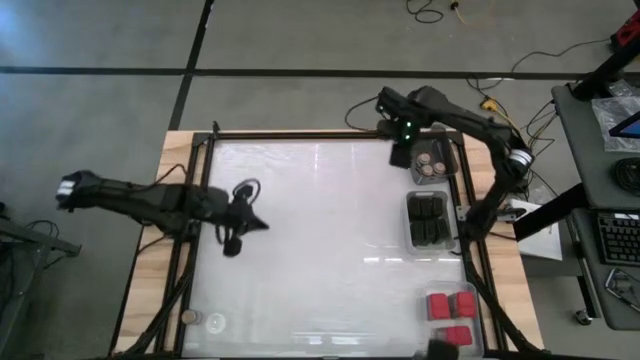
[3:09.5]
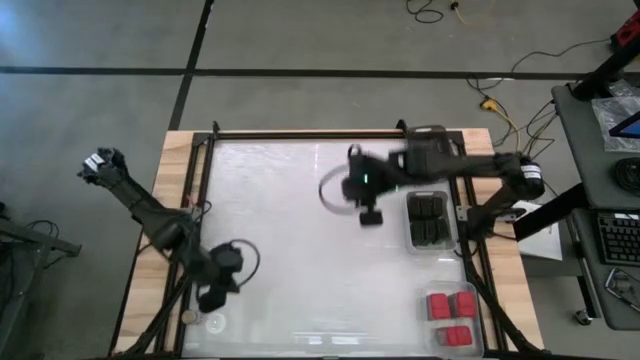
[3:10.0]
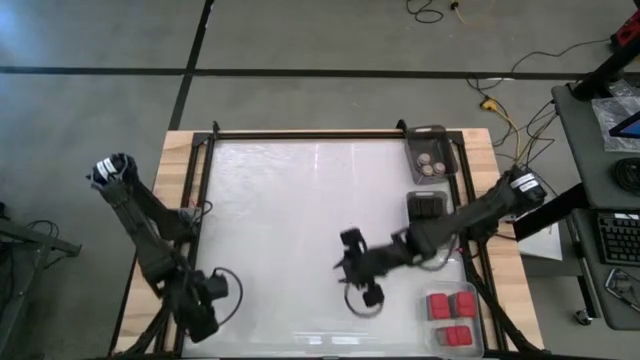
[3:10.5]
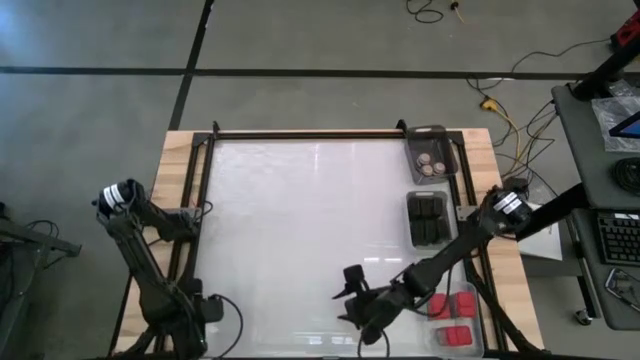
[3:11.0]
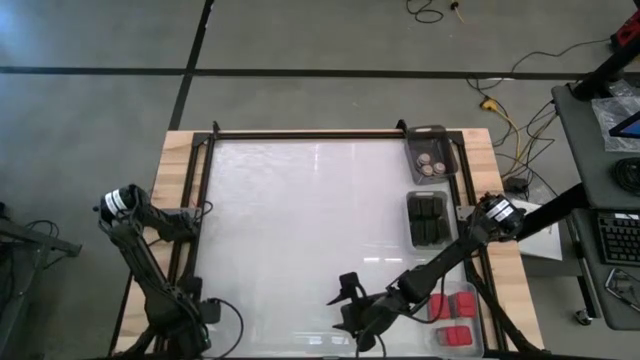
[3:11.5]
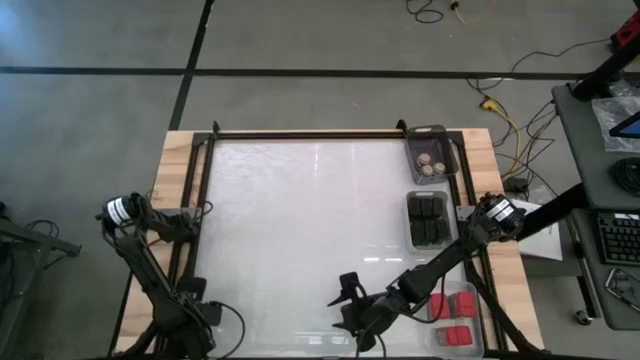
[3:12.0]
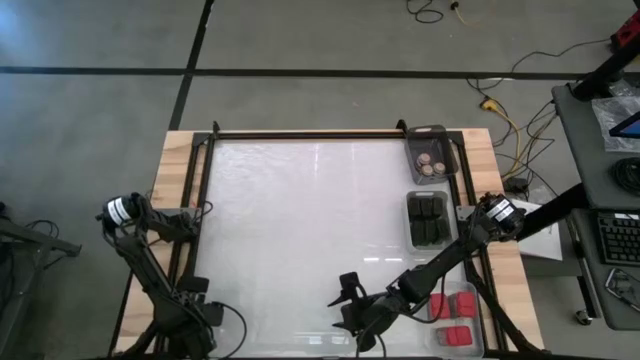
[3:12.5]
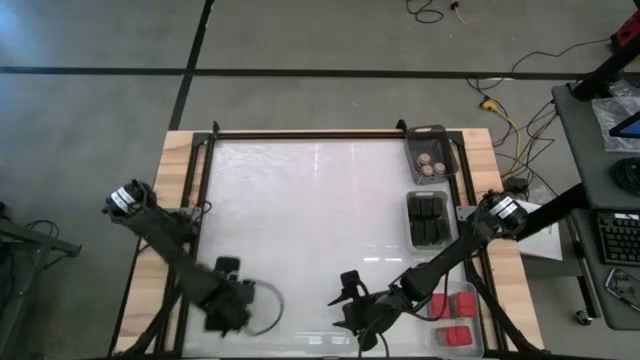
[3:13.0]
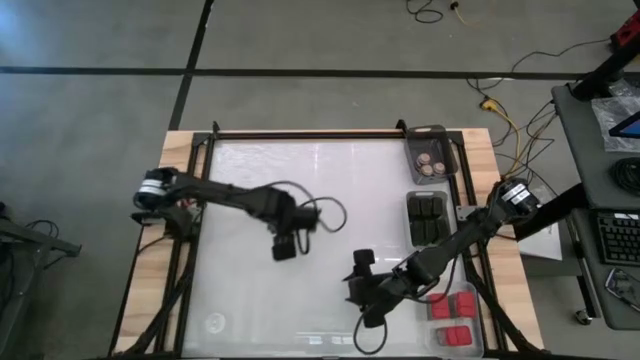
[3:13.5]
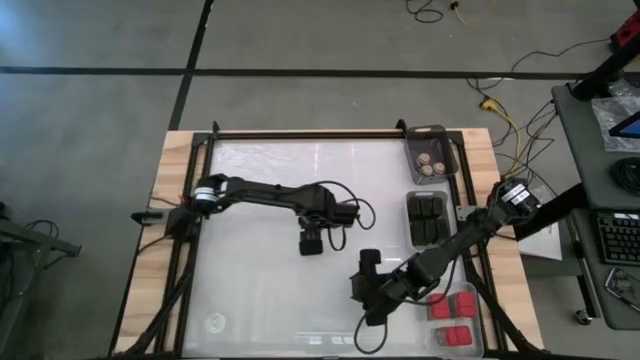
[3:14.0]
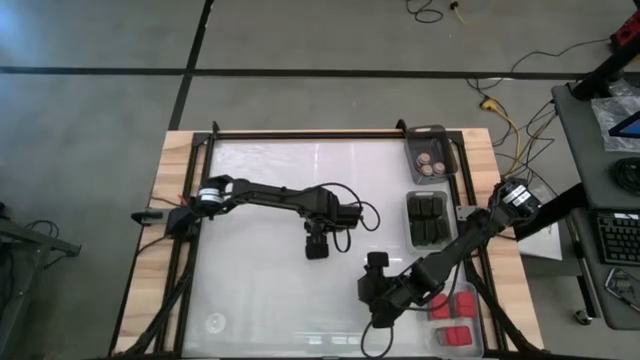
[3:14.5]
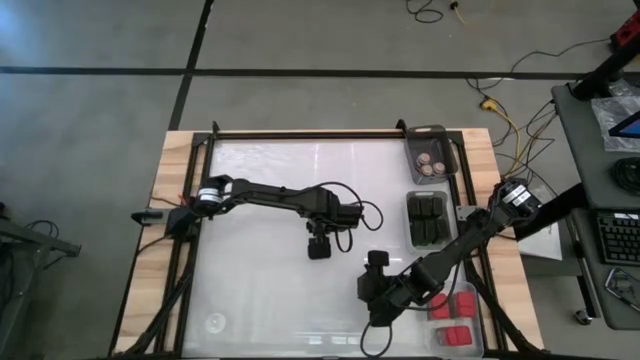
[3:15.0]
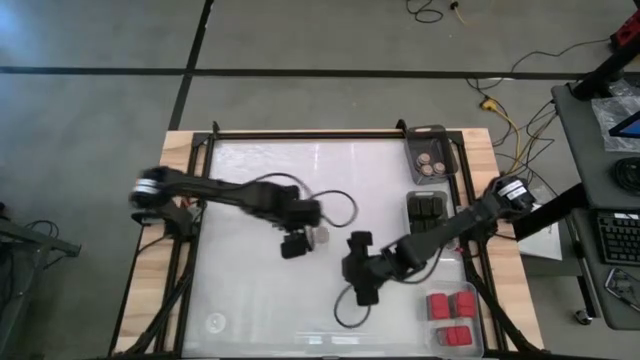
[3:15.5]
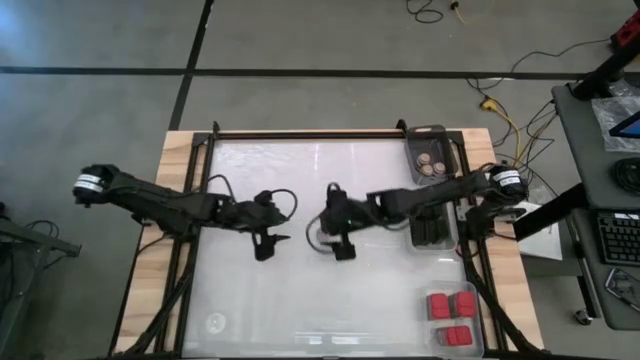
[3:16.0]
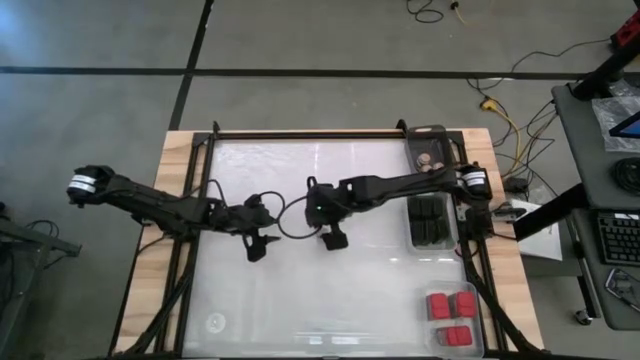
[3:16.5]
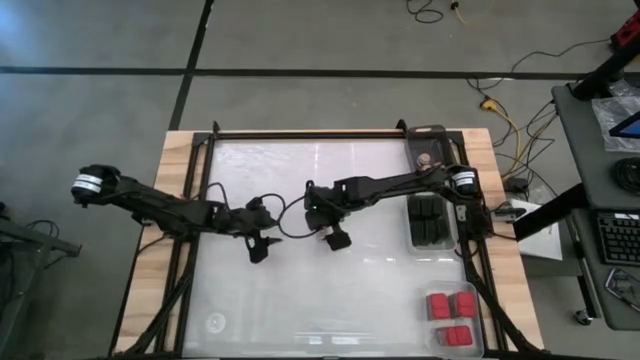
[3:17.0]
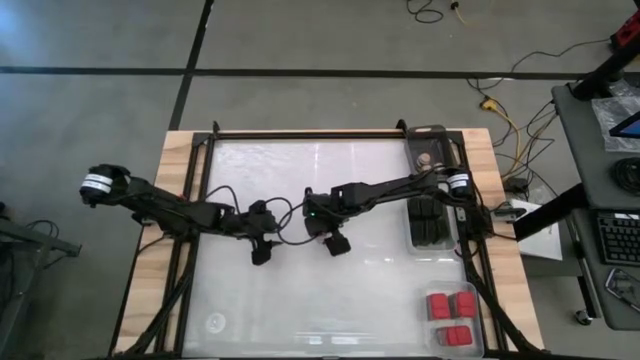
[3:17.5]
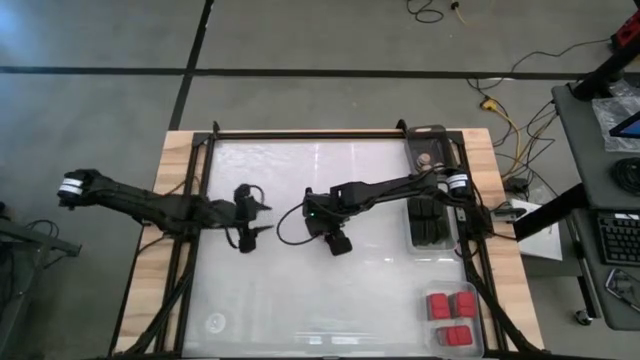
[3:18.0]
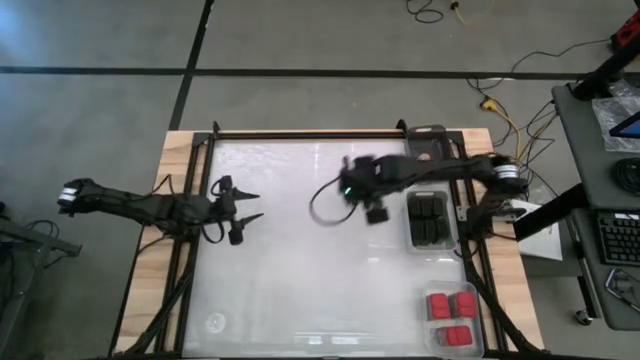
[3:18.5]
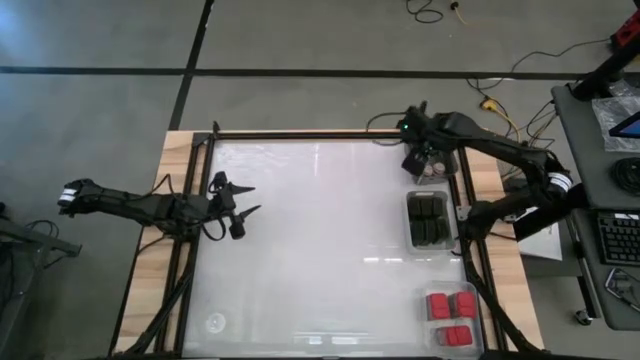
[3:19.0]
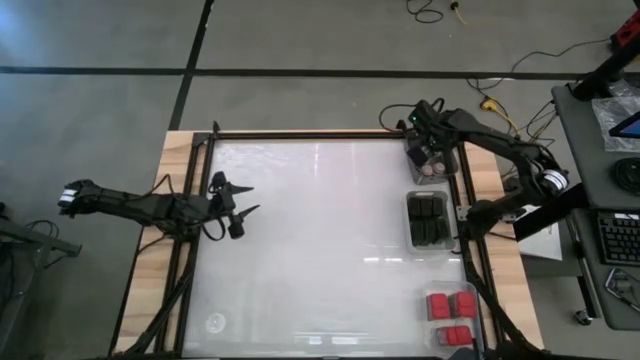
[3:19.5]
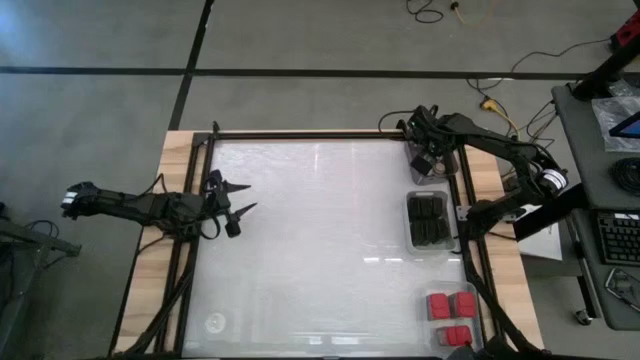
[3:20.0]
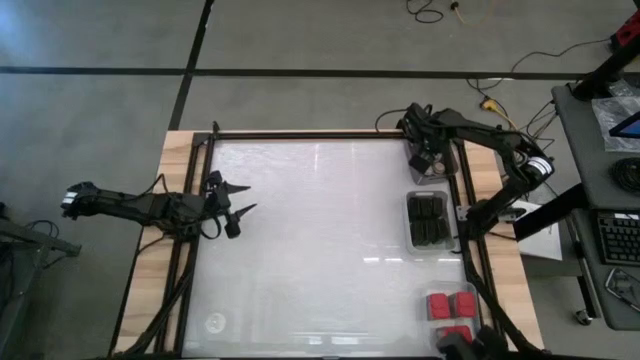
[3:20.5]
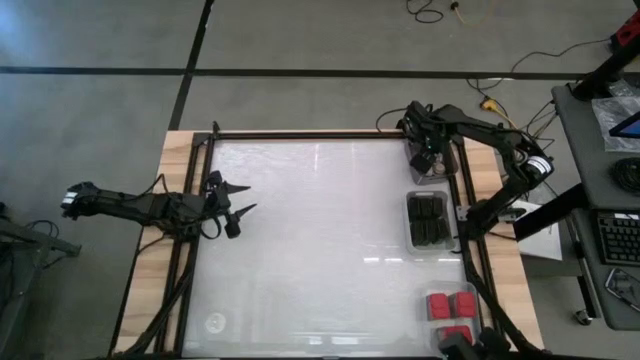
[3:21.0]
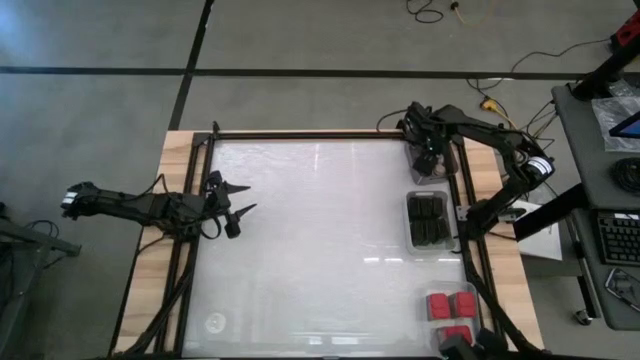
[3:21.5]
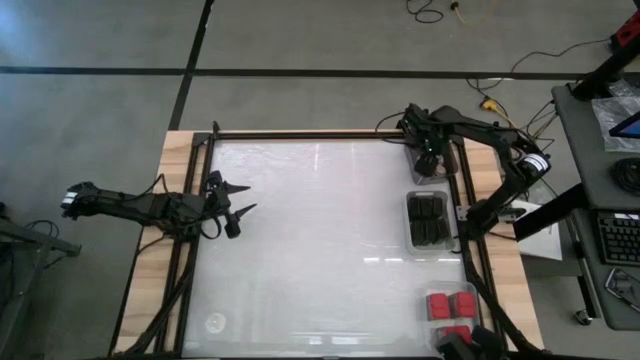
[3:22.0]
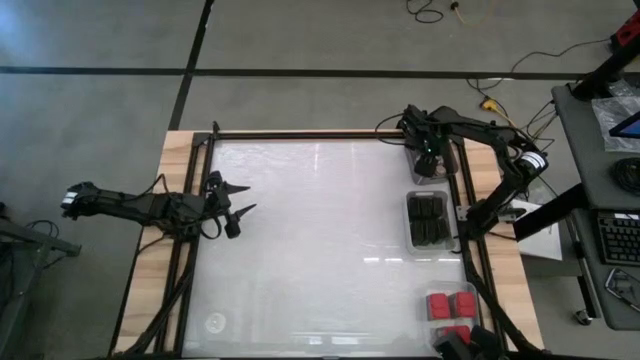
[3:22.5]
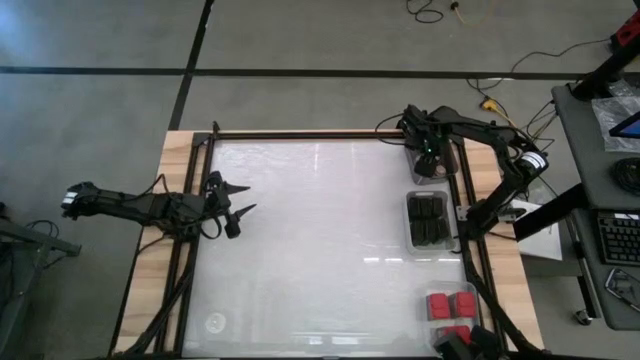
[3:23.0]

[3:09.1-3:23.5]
Task: Sort spices by type
Put the brown seasoning bottle into the black bin

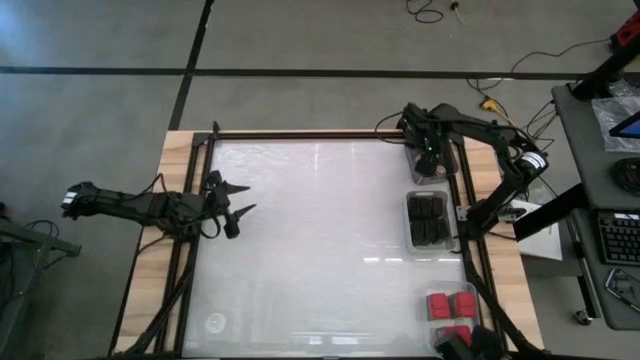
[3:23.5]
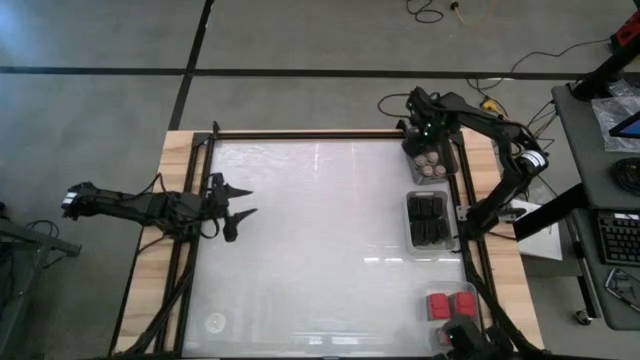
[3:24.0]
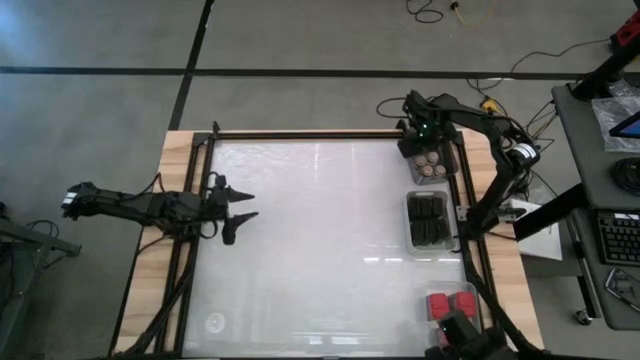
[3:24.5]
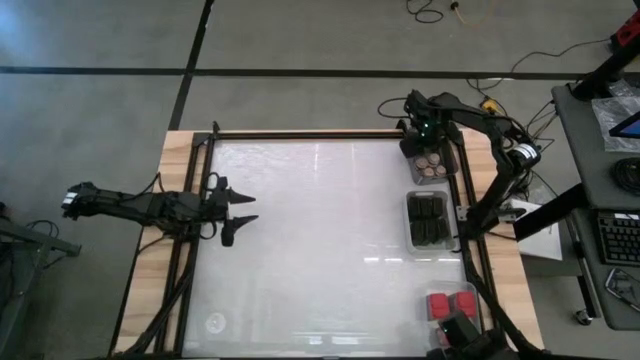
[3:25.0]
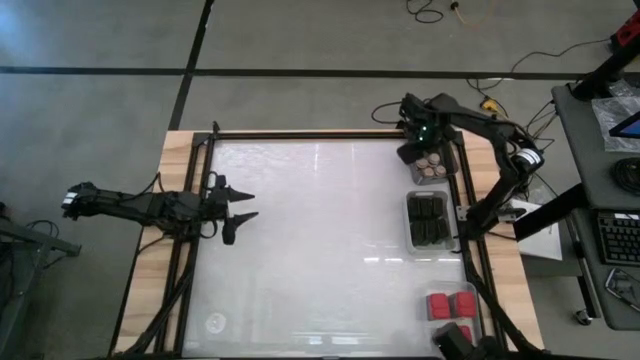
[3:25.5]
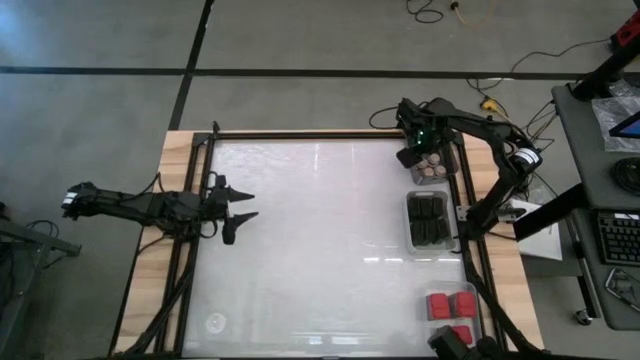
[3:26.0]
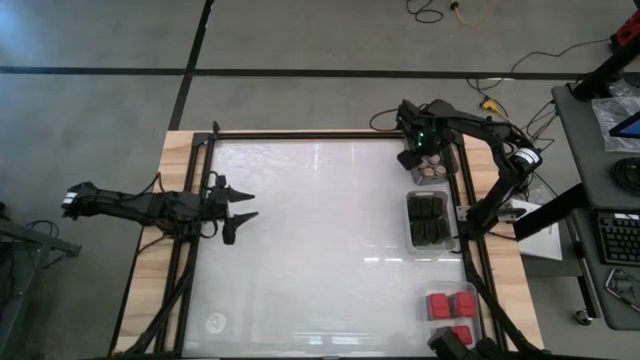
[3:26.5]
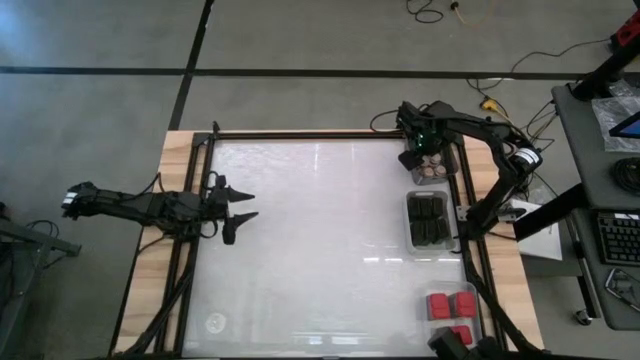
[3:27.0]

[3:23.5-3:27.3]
Adjust the brown seasoning bottles in the black bin

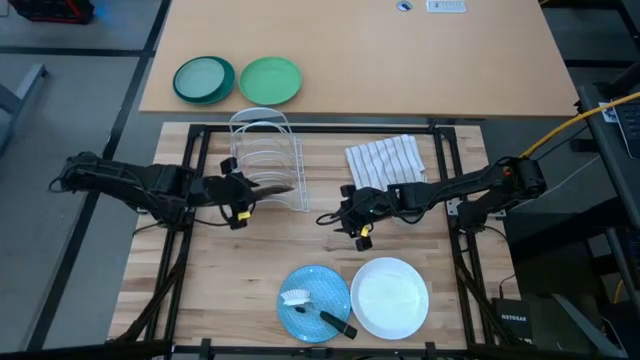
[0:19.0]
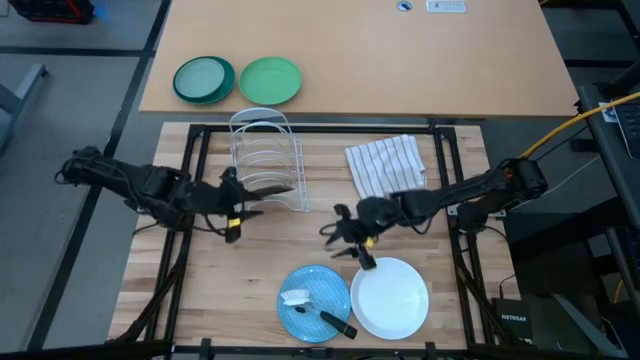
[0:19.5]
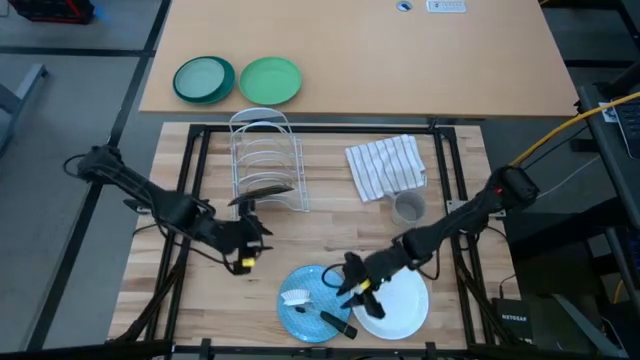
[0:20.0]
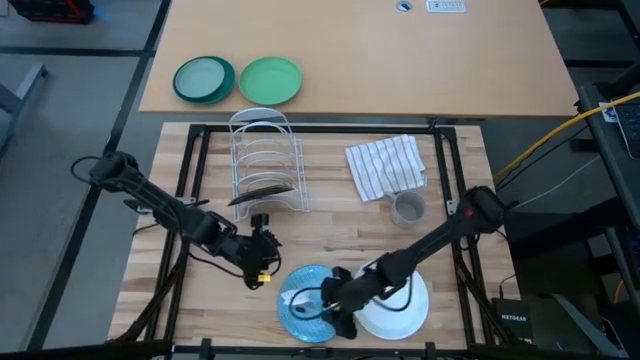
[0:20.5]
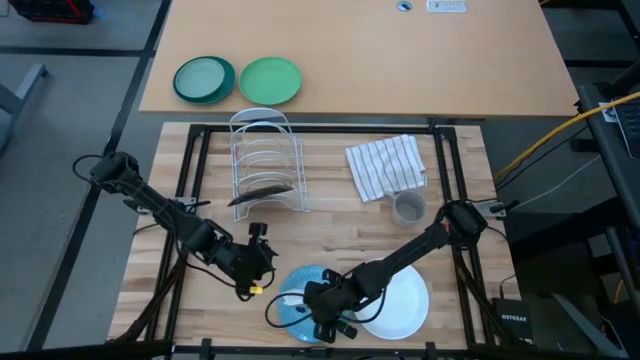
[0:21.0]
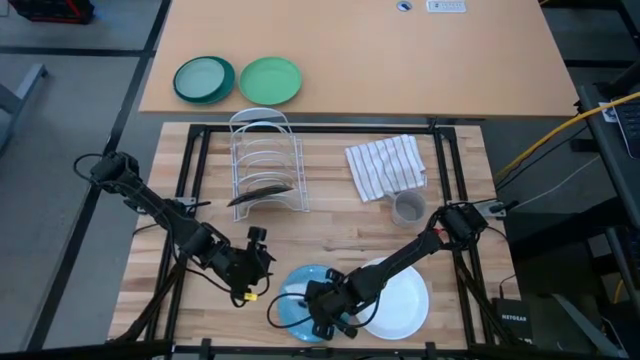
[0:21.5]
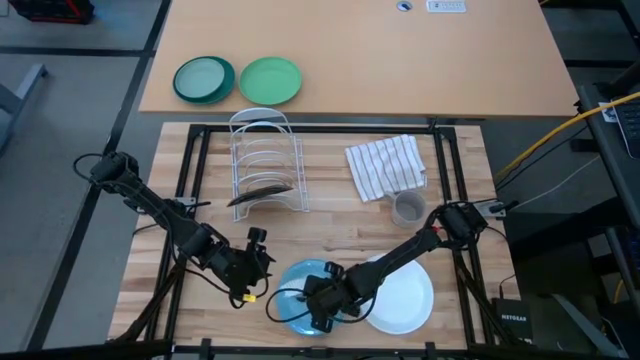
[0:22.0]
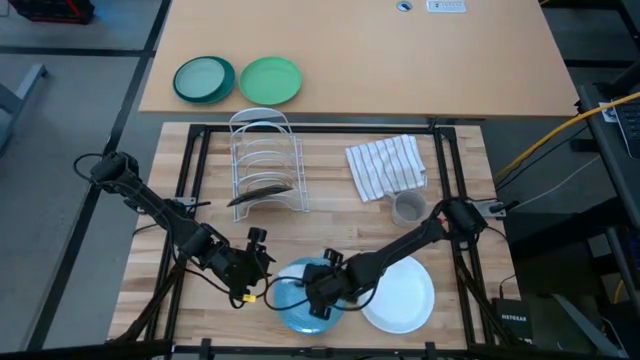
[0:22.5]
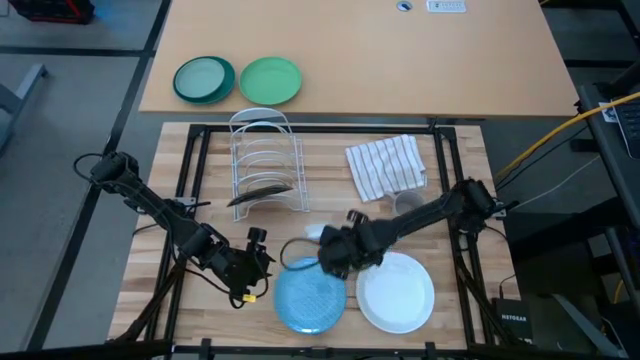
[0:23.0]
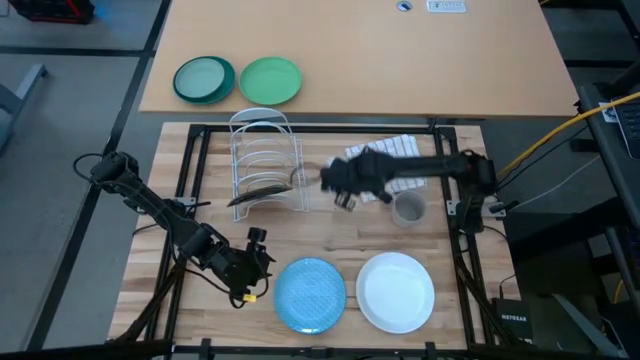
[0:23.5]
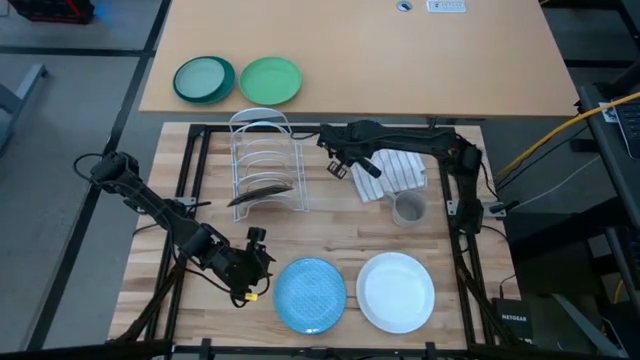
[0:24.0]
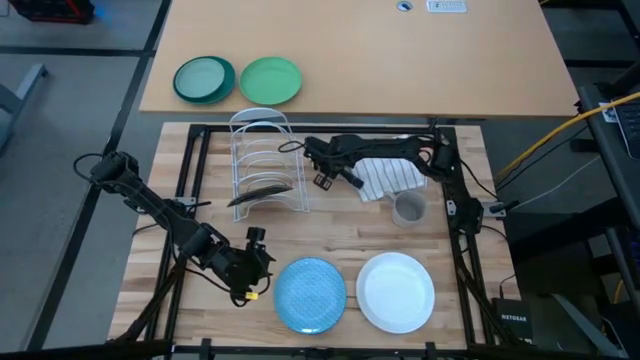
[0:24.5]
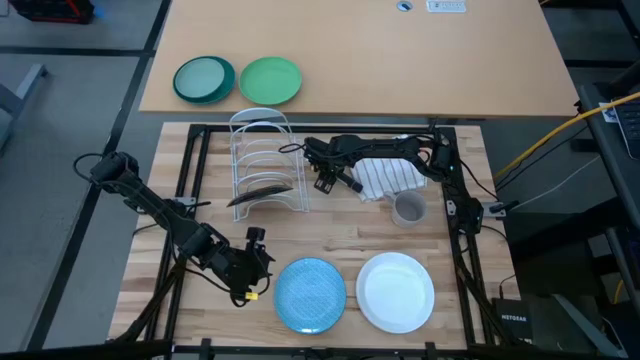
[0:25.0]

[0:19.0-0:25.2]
Task: Sort dishes
Remove the dish brush from the blue patterned plate
